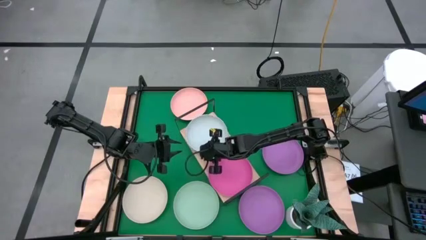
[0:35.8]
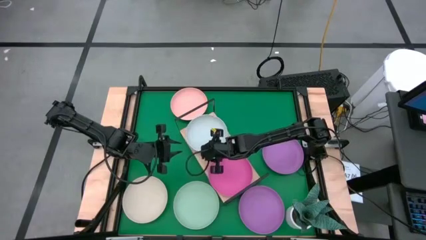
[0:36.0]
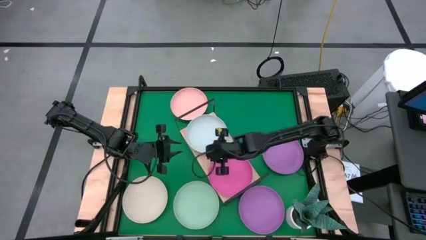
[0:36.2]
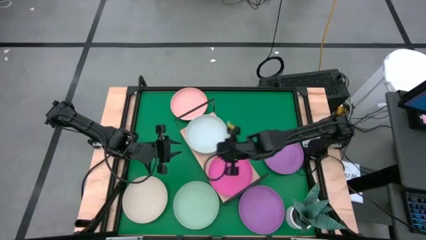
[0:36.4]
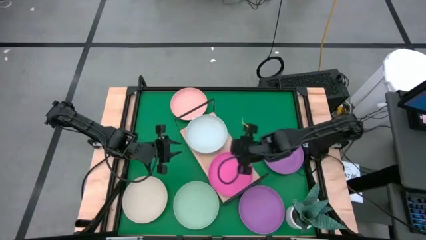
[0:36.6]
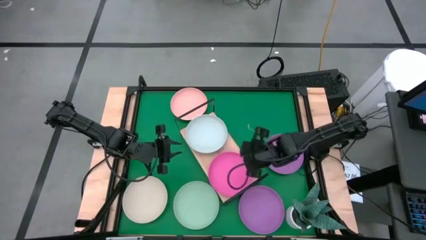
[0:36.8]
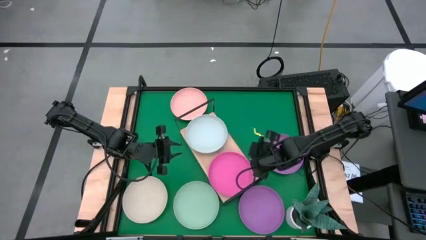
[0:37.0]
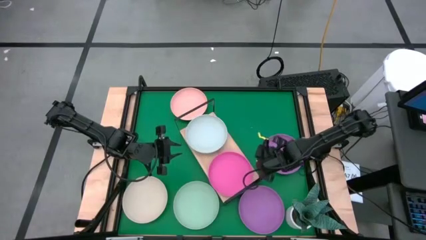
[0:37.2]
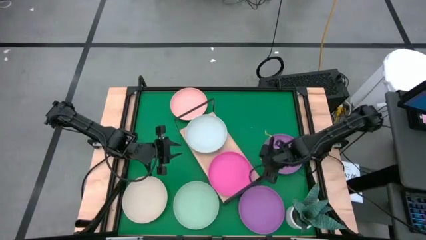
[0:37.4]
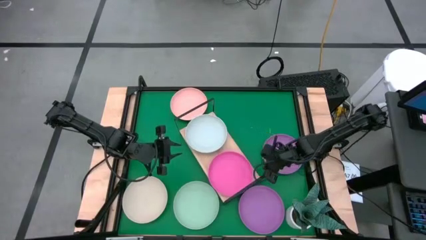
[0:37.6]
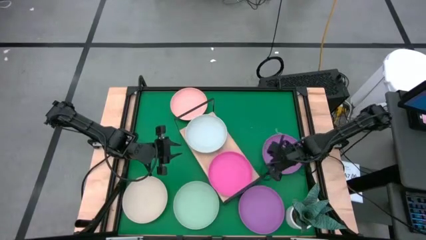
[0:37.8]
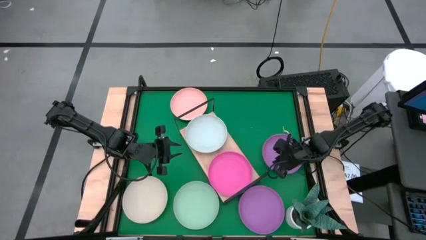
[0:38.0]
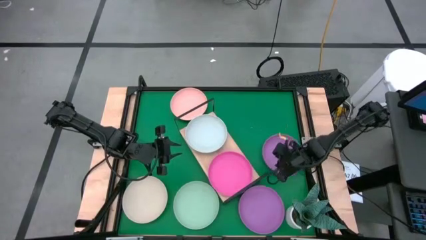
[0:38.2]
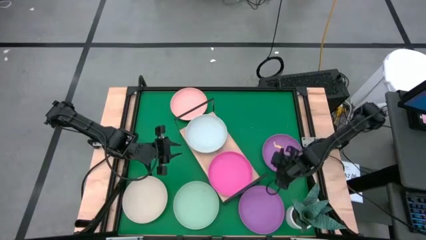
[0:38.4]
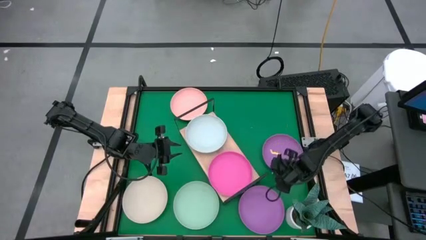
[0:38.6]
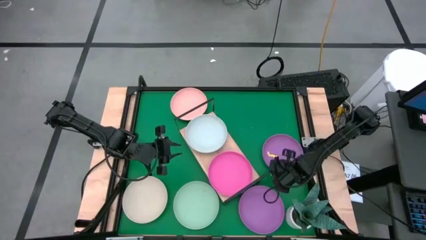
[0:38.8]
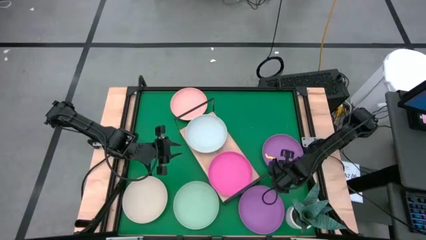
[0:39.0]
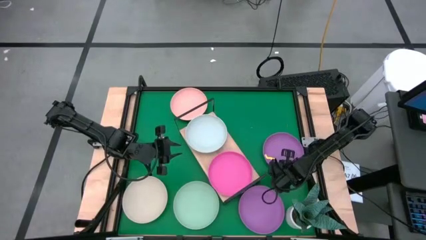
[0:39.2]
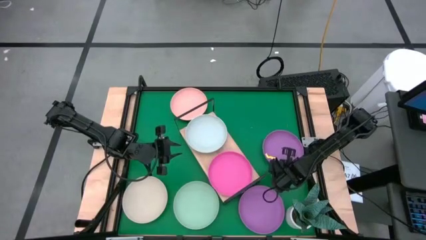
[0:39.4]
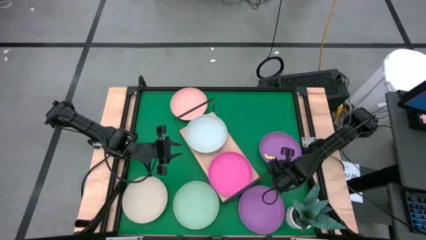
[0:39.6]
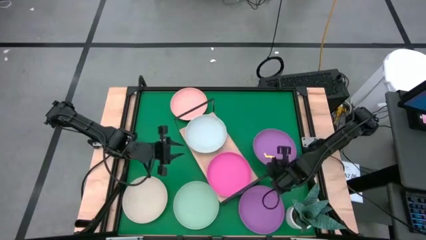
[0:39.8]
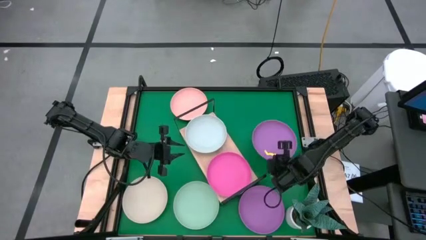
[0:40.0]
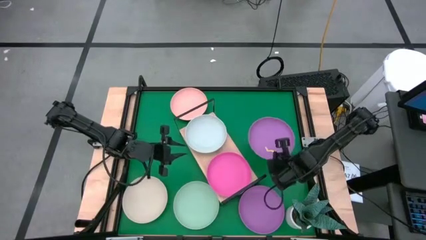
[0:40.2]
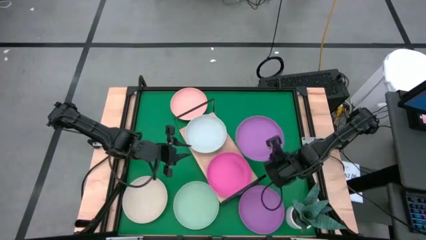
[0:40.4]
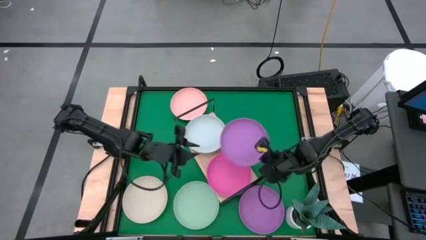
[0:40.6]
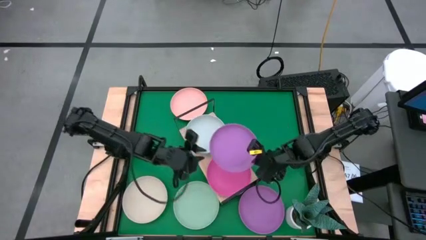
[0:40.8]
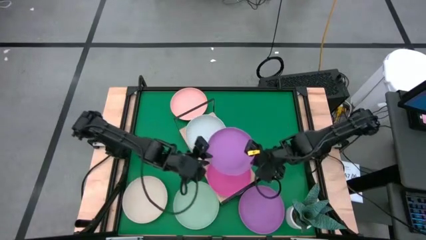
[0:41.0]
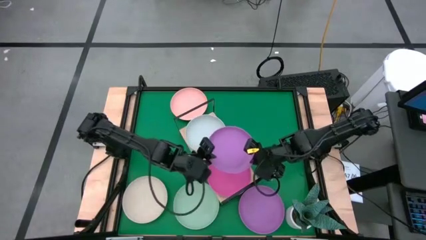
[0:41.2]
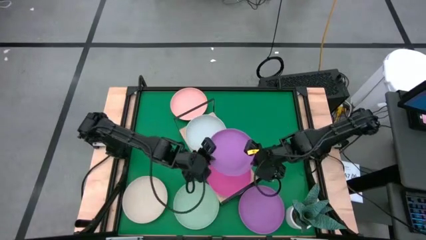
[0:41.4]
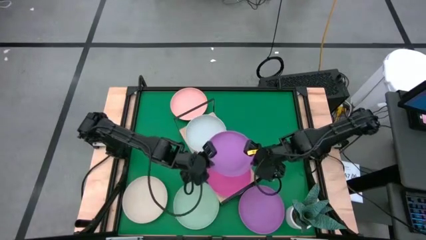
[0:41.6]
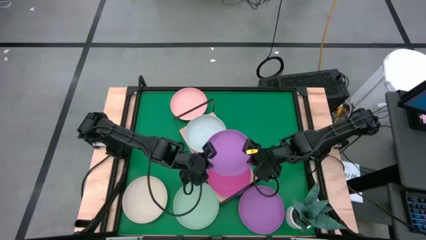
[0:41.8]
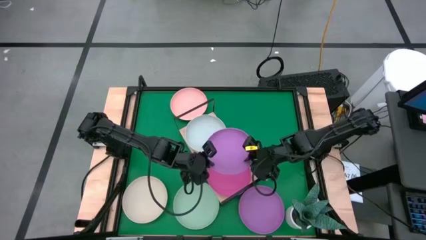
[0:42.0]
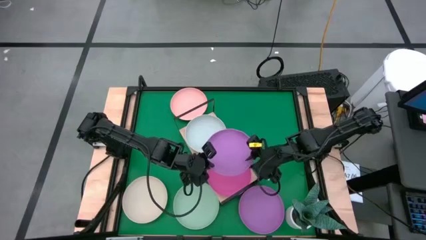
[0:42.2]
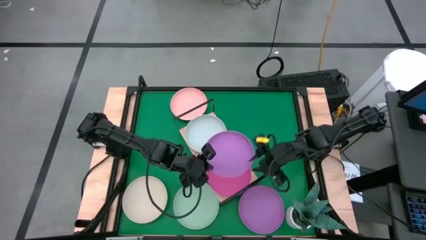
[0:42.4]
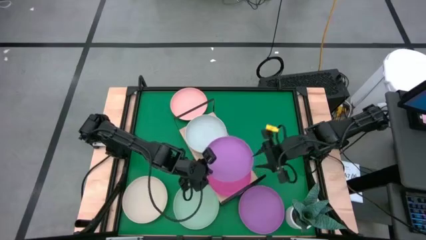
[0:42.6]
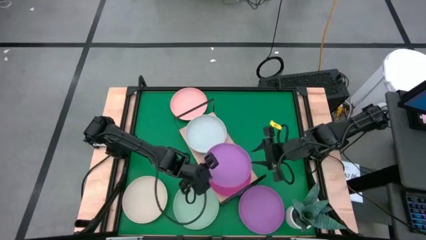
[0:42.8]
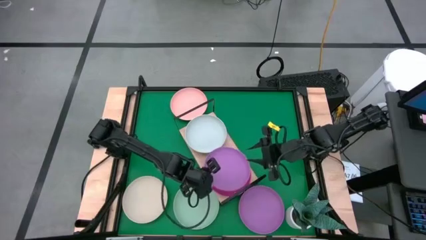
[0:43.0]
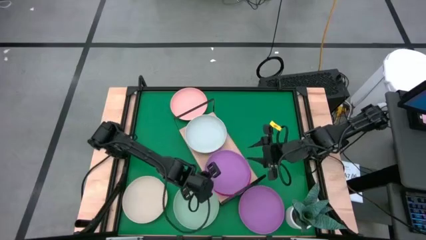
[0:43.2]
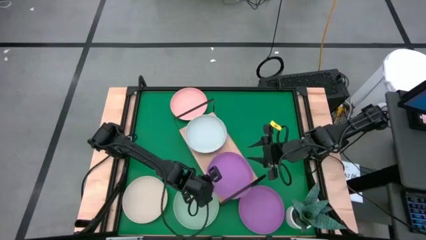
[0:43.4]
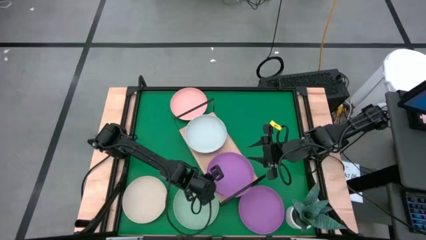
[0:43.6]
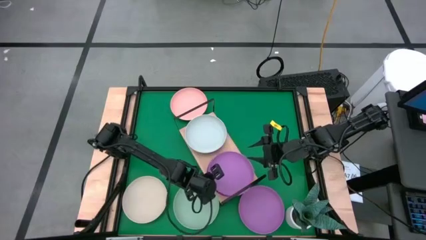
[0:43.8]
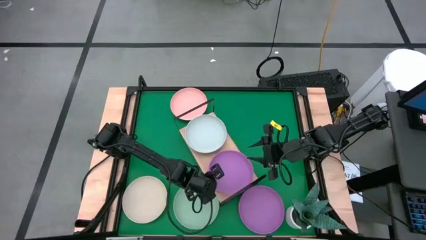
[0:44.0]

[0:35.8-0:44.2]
Task: Place and stack plates onto a shelf
Stack the top violet plate on top of the pink plate on the shelf

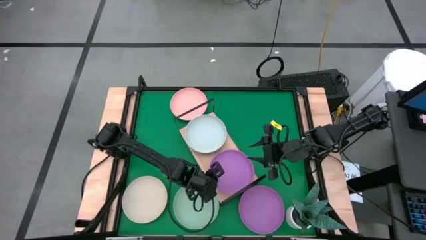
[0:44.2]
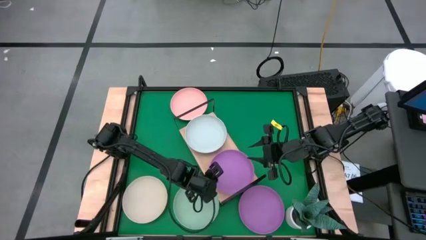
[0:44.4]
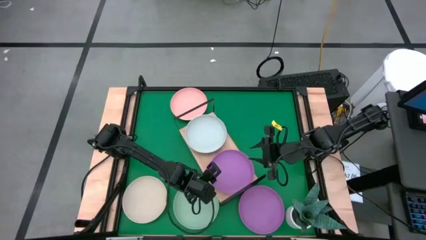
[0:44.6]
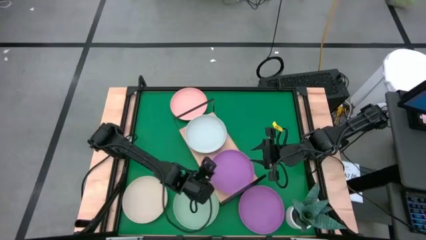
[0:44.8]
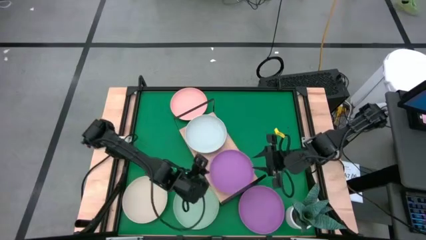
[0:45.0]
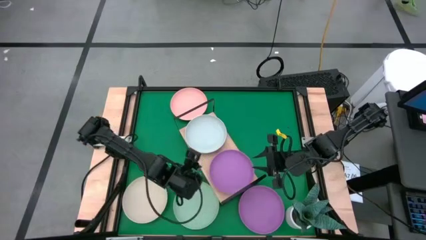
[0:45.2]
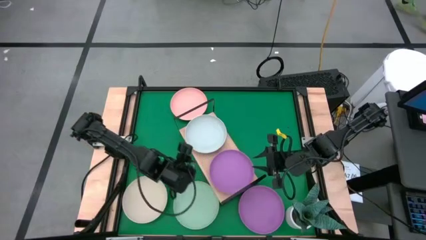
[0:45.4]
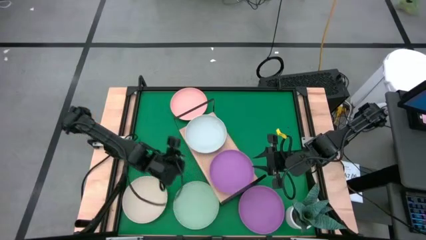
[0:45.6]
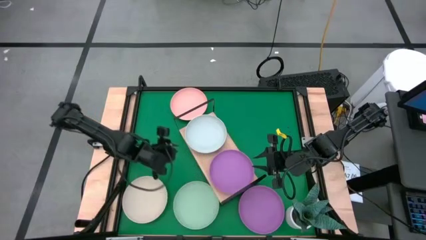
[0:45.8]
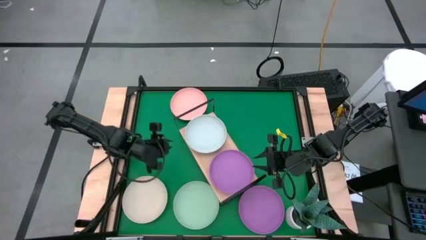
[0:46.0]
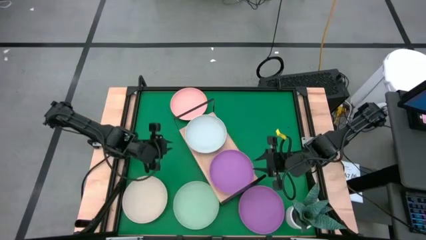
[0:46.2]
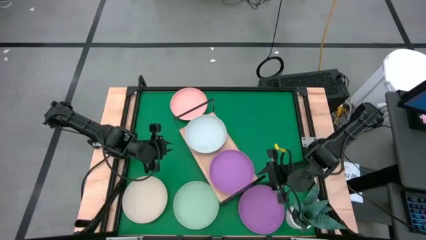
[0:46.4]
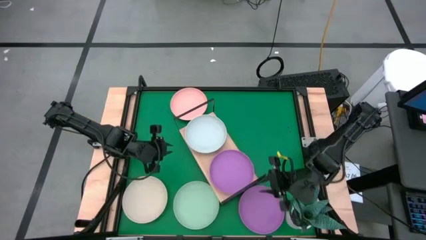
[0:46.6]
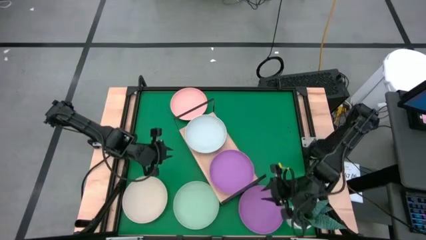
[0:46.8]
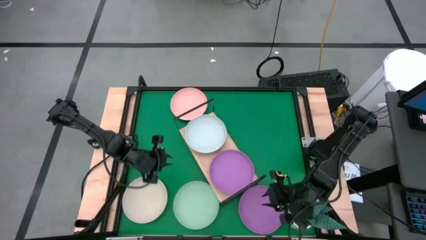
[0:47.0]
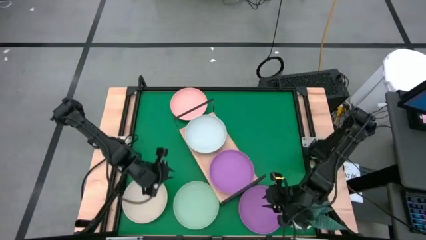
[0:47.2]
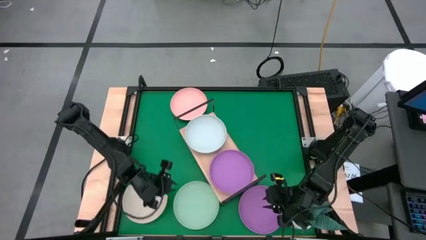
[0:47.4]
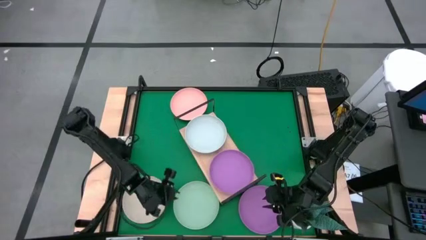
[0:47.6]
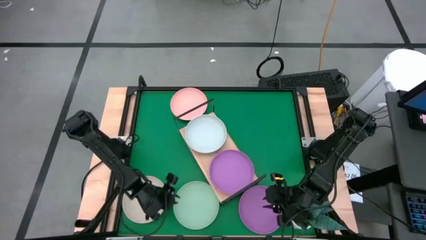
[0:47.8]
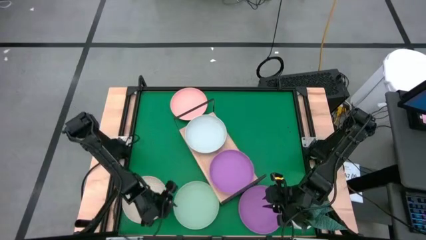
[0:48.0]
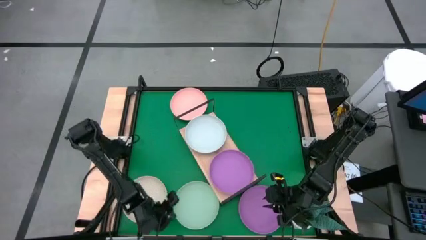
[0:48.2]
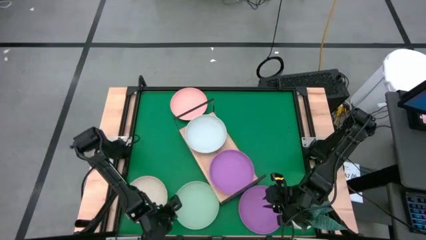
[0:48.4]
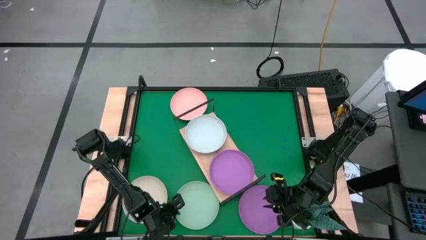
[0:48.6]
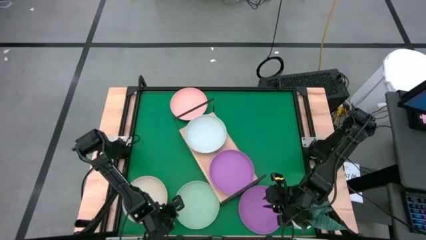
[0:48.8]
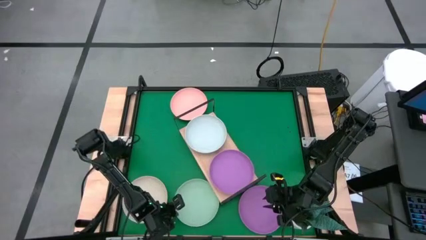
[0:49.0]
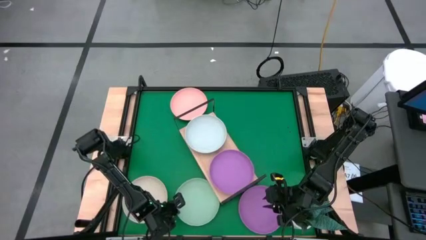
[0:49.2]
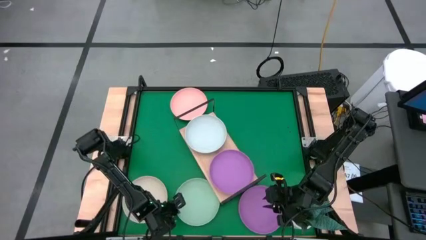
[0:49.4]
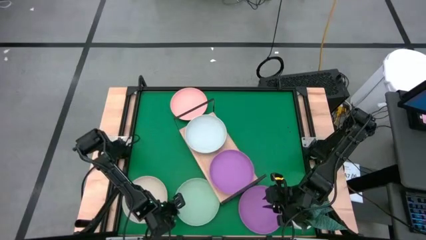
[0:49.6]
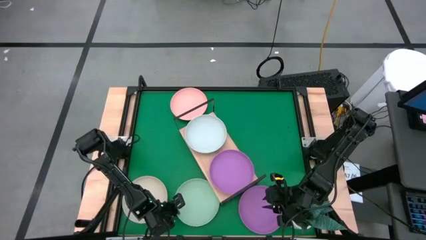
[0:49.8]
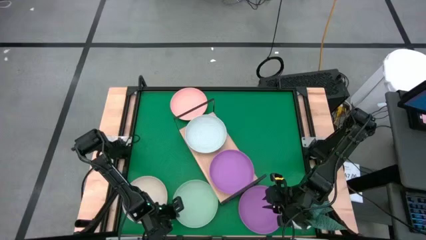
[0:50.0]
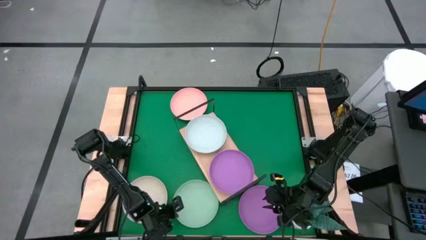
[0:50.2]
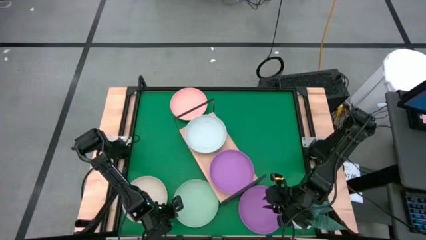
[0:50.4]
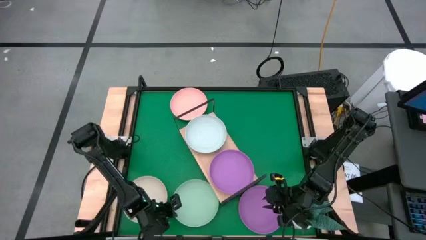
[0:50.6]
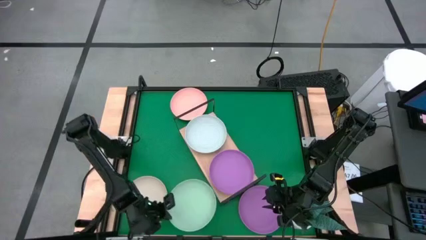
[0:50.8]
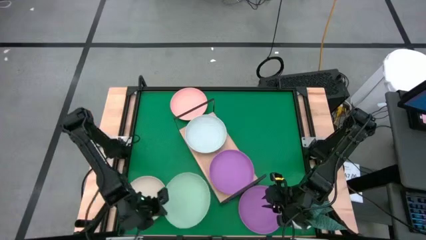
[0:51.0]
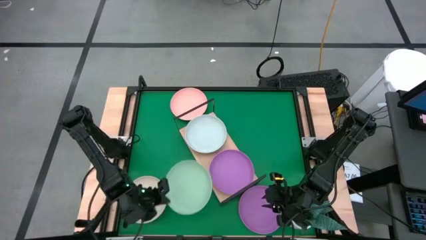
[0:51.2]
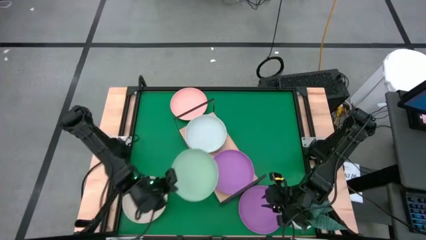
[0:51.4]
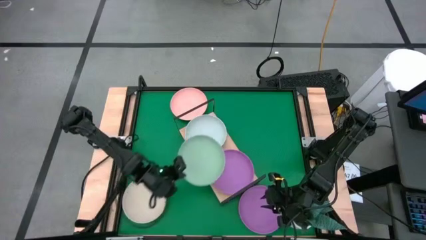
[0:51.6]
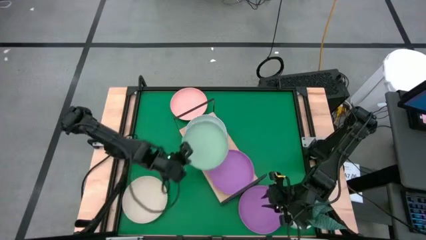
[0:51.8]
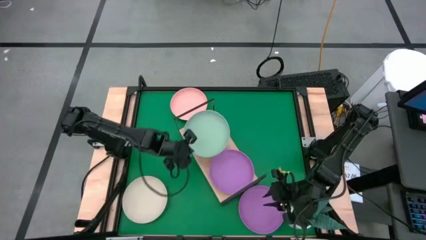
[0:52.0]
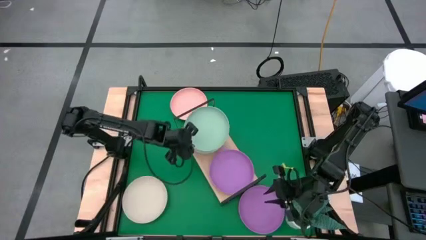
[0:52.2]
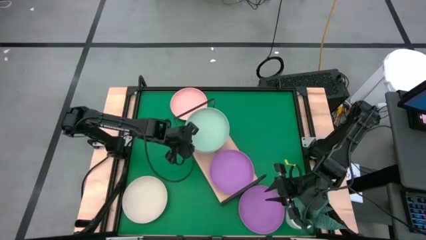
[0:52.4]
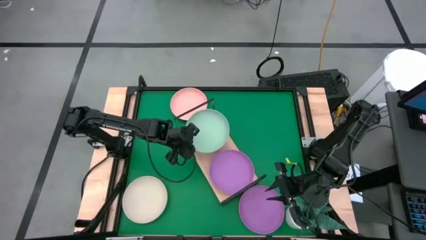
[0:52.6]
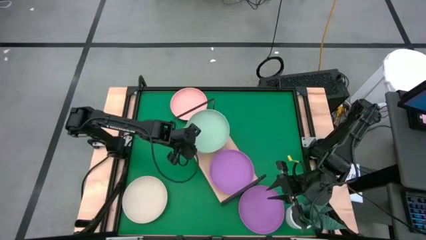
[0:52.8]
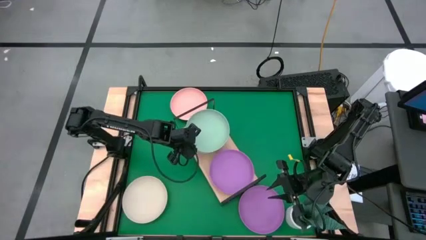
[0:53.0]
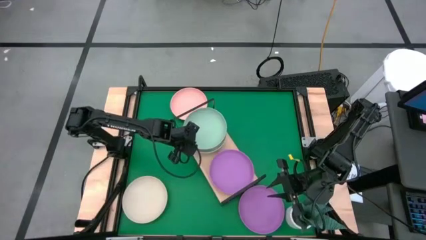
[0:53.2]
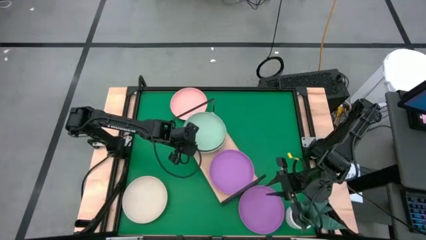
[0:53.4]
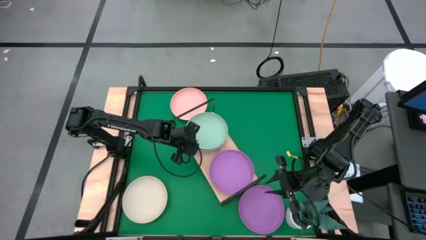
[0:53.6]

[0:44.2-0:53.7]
Stack the green plate on top of the gray plate on the shelf
